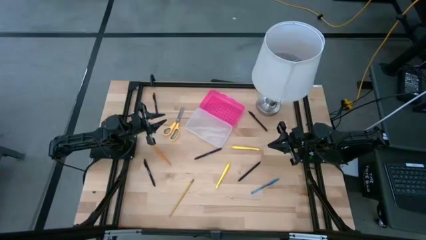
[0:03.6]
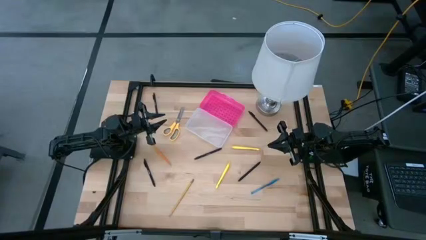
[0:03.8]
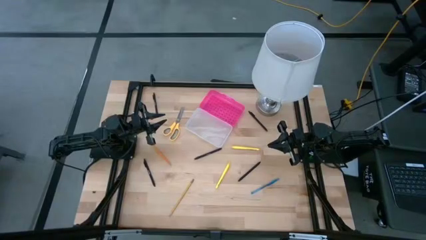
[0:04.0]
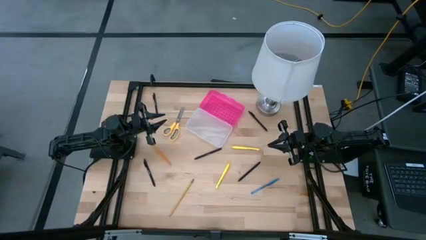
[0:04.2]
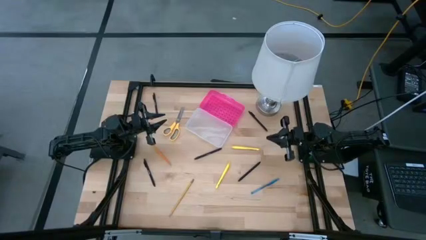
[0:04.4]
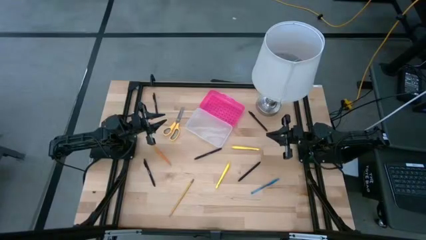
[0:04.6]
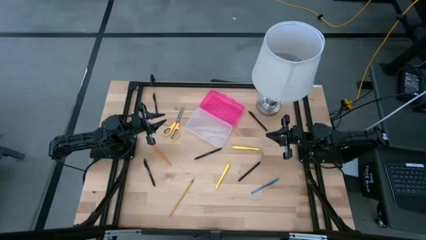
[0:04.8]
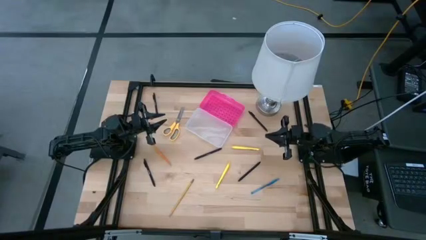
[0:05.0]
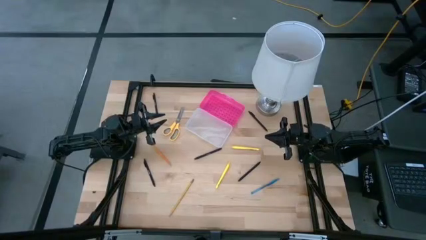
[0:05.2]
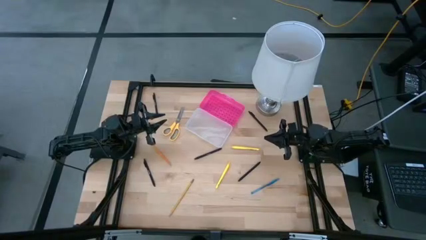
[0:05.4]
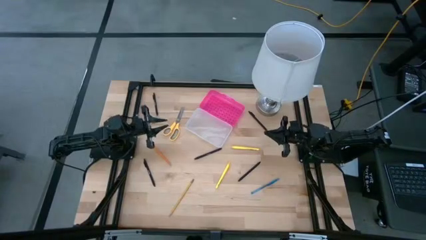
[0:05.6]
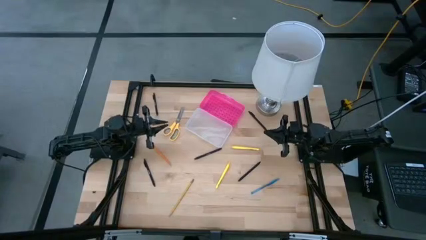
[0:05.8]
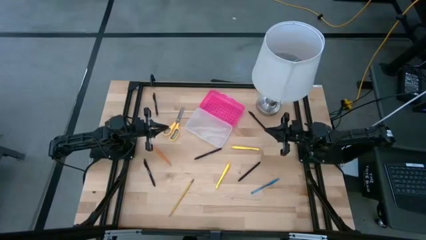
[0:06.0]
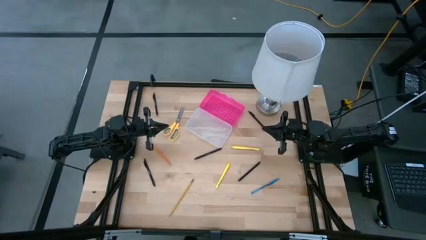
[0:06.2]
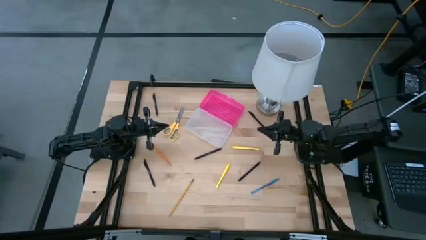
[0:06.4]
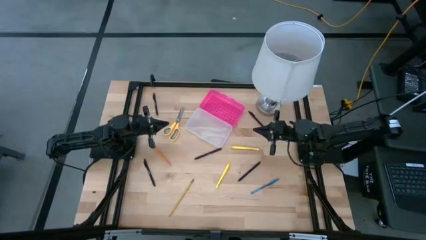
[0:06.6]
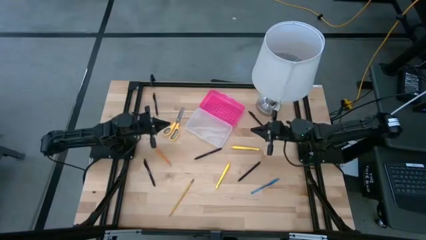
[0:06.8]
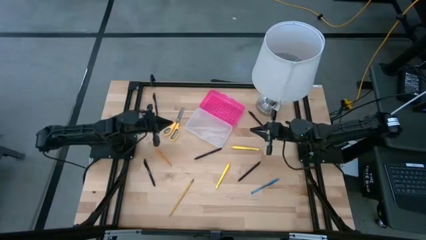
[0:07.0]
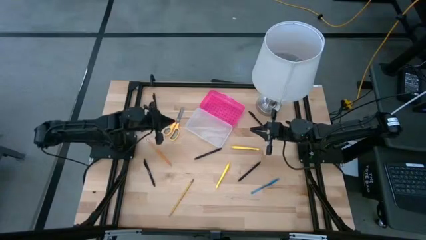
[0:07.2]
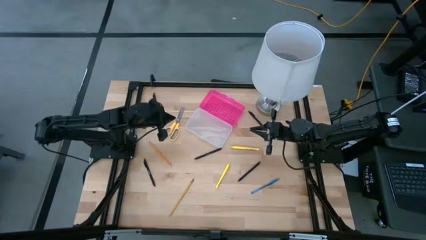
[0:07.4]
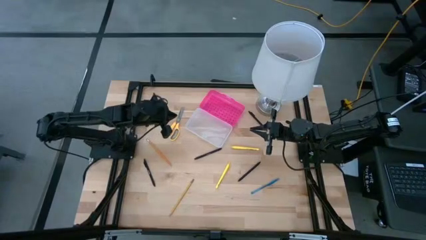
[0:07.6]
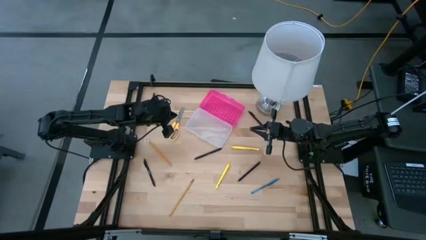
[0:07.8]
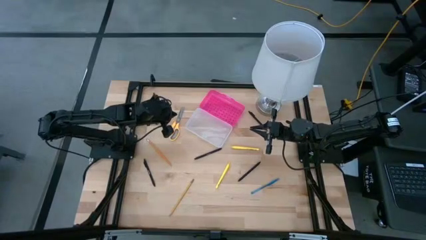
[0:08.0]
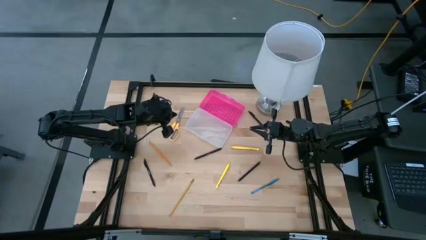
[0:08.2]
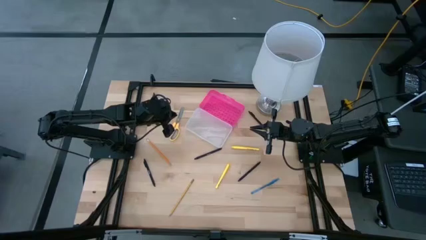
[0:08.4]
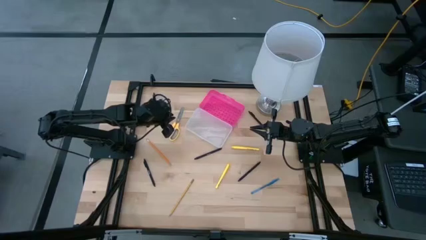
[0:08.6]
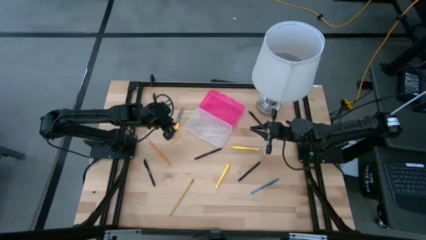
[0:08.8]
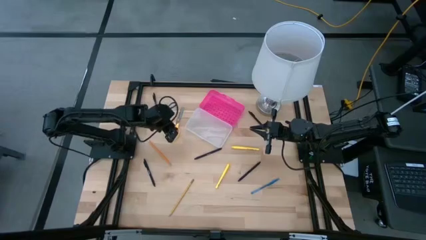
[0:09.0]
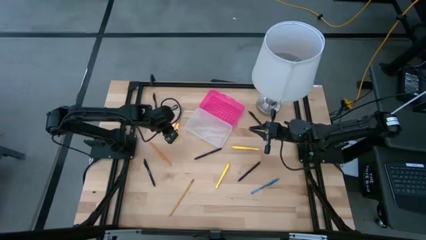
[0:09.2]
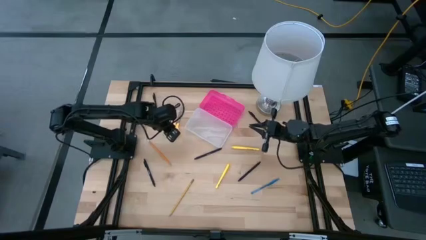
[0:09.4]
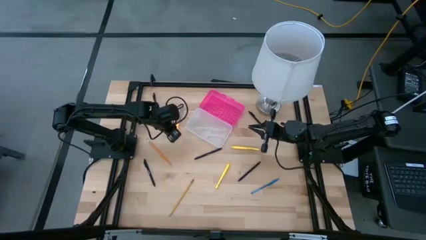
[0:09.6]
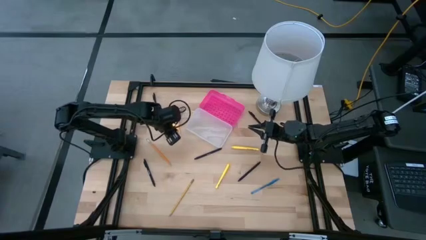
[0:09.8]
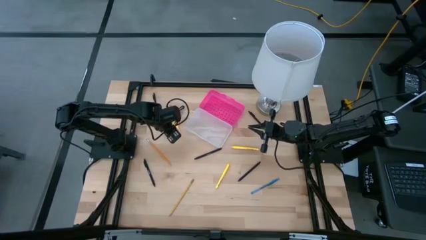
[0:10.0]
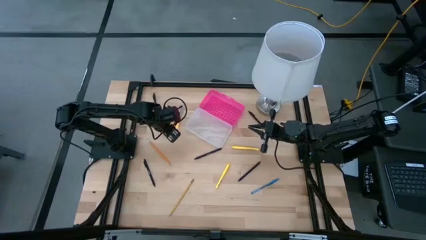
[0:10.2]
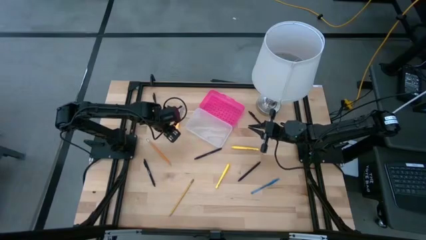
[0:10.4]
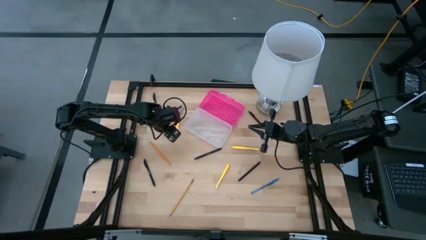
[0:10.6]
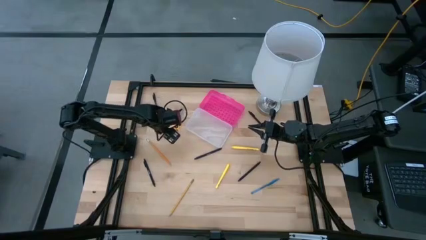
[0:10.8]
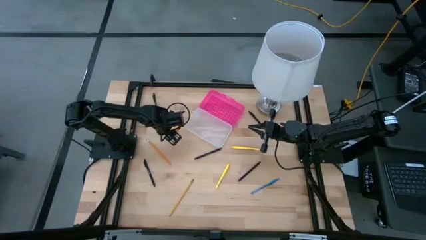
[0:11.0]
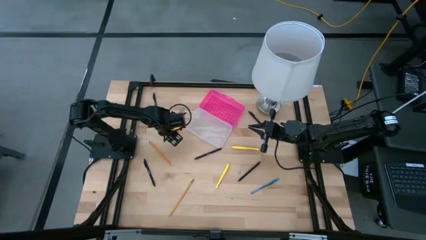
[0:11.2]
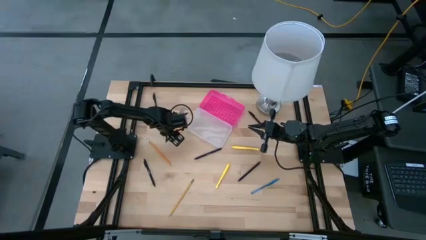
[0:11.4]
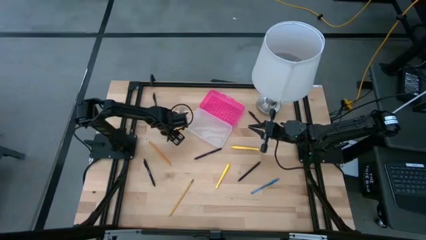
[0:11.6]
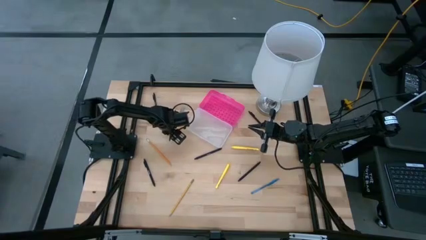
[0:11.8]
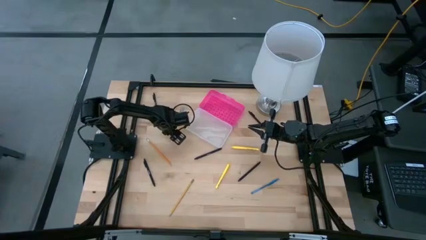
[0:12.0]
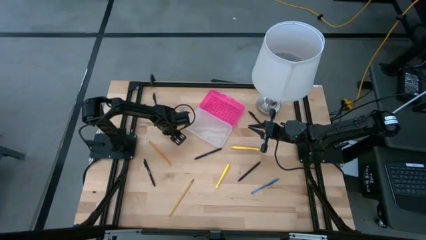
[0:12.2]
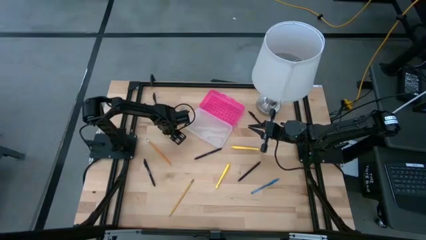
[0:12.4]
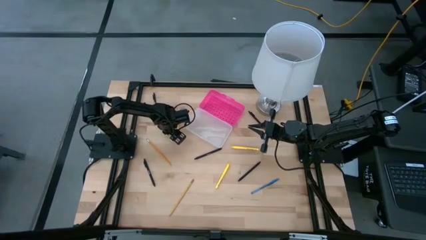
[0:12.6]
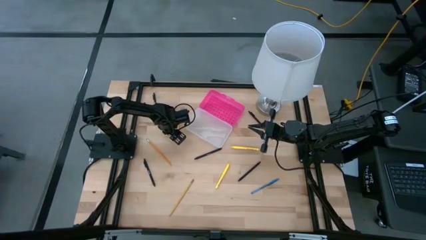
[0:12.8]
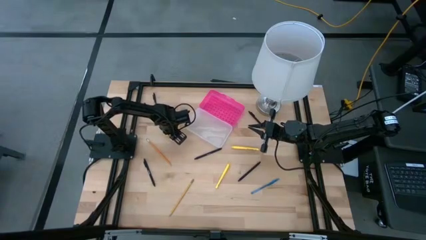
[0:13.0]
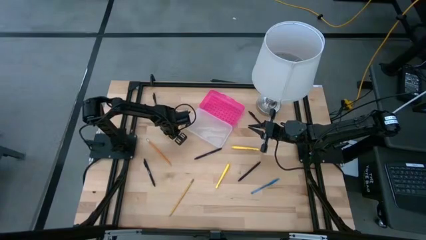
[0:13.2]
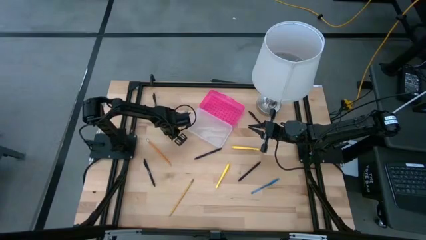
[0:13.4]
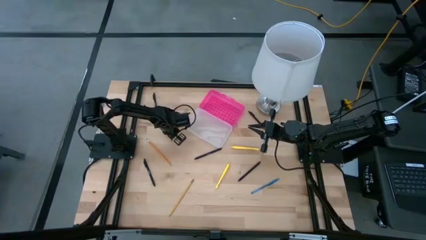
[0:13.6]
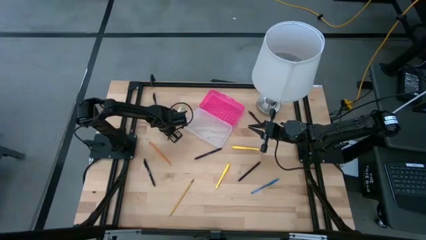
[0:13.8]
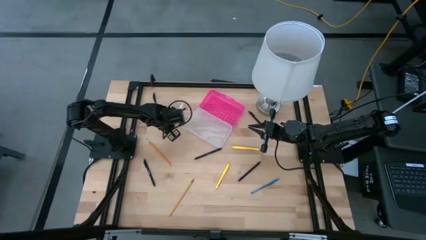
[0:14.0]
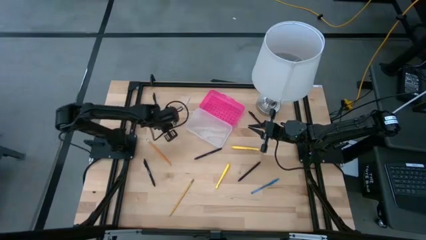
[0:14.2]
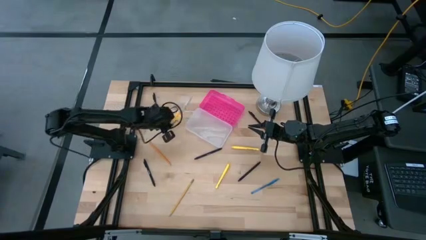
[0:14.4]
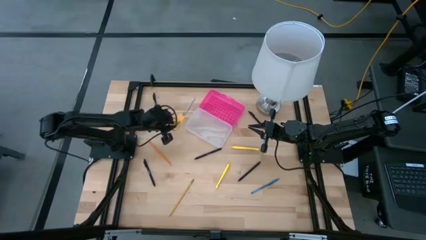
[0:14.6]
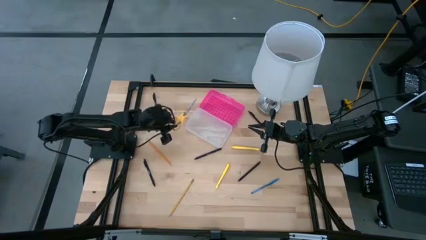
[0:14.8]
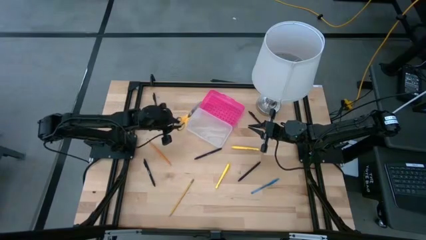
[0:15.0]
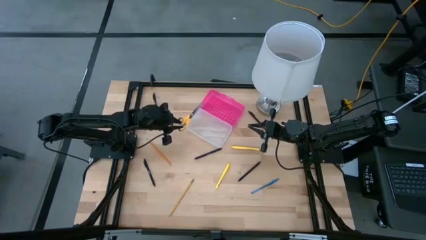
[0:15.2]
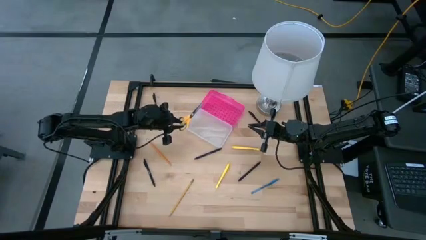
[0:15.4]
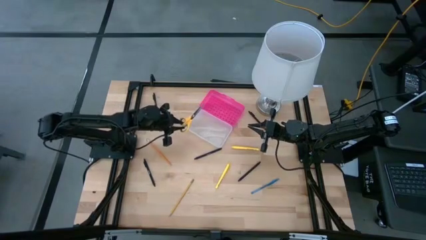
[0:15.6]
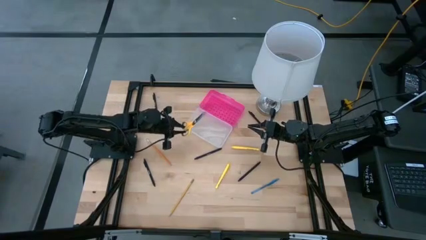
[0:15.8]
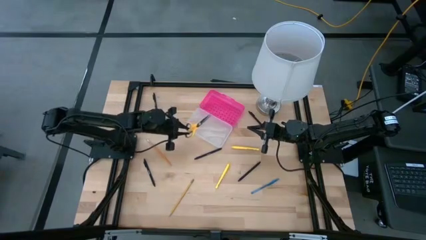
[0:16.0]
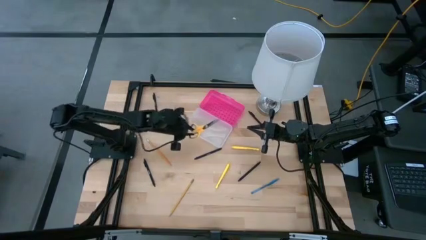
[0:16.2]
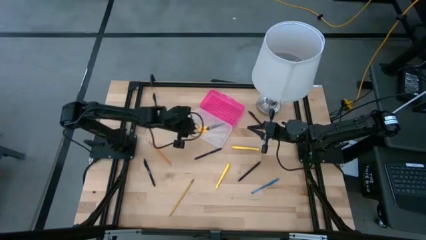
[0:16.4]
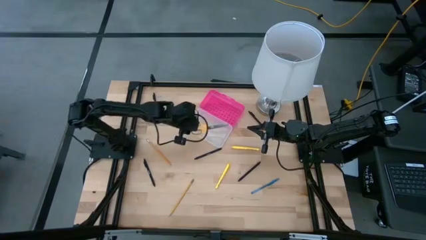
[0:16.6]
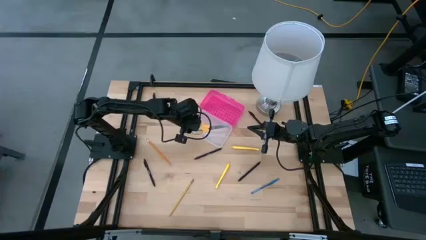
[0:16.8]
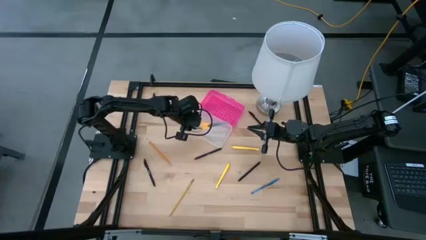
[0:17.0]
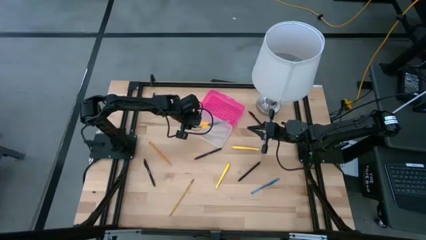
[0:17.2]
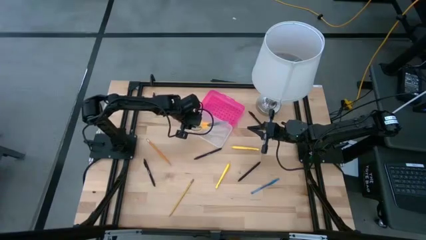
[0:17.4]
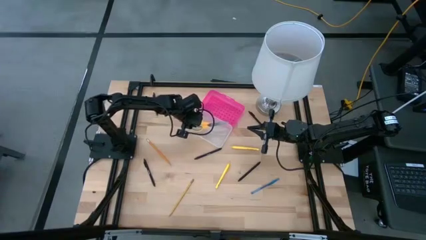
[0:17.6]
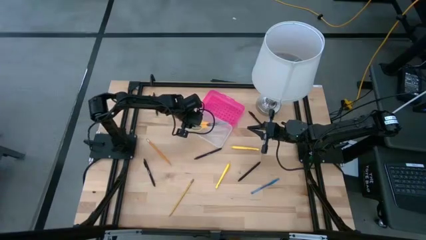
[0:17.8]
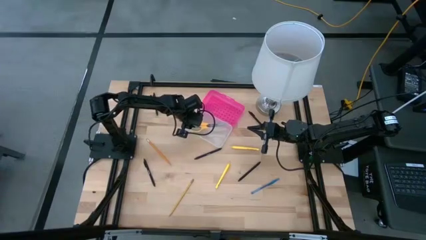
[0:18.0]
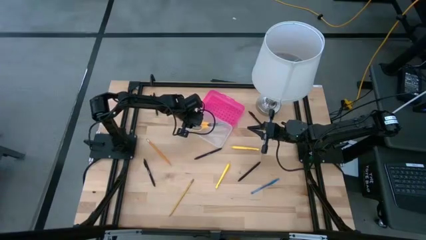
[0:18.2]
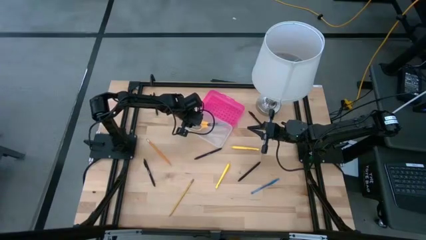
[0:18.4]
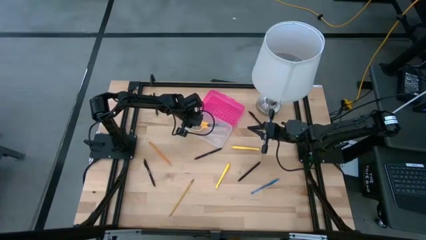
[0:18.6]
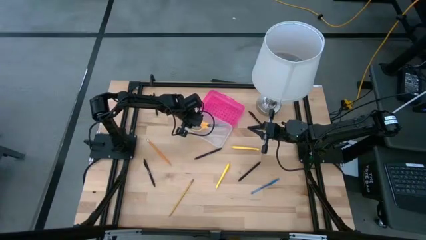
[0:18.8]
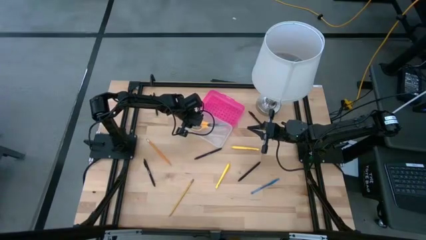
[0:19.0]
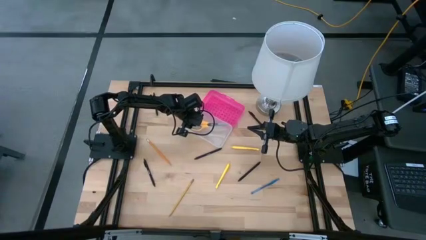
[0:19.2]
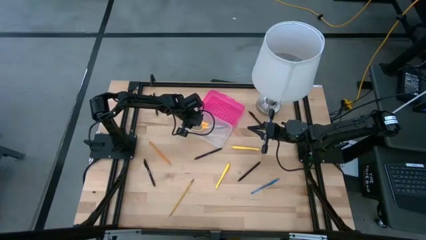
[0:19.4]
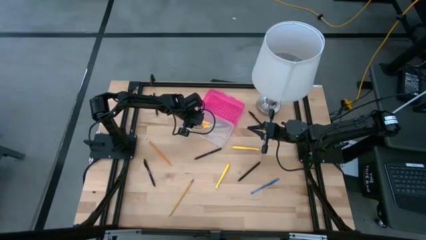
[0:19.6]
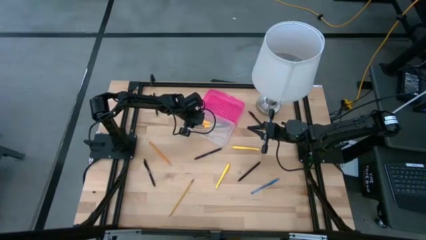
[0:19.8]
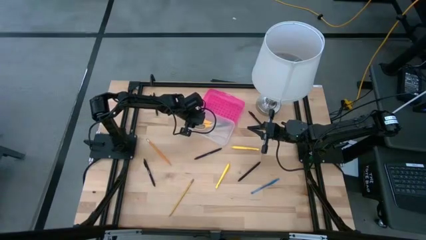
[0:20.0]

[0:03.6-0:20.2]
Task: Pick & place school supplies into a supply box
Put the yellow scissors into the pink supply box
